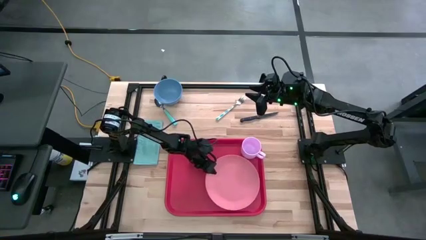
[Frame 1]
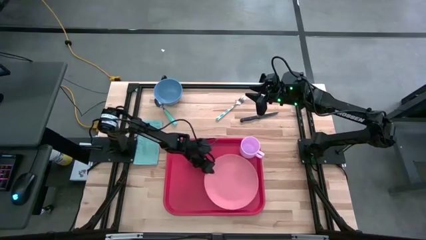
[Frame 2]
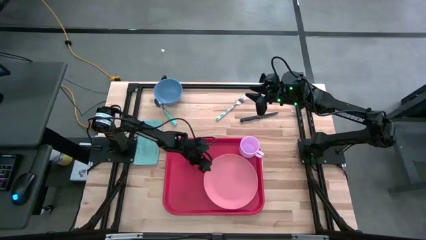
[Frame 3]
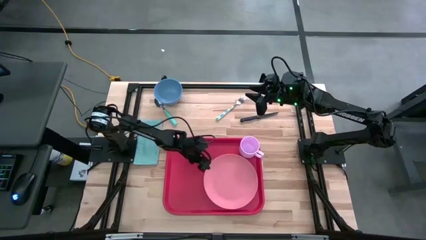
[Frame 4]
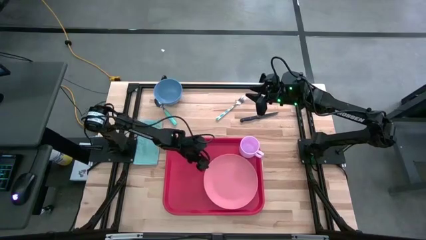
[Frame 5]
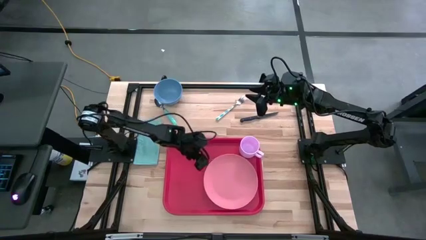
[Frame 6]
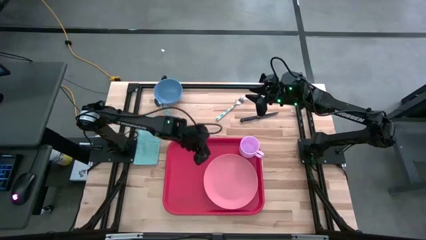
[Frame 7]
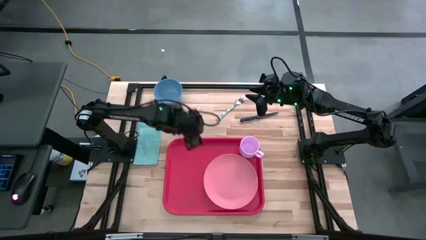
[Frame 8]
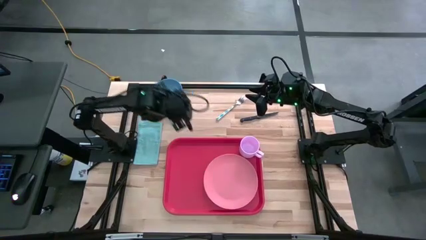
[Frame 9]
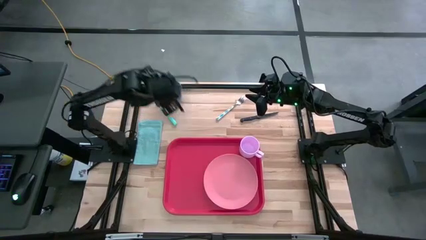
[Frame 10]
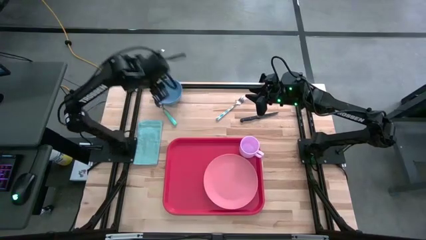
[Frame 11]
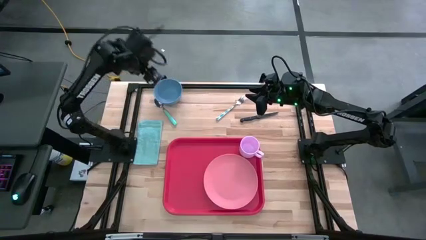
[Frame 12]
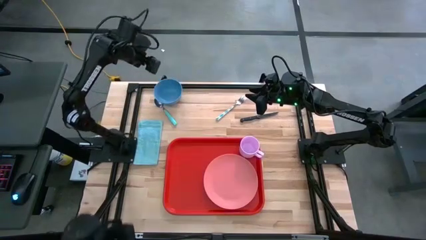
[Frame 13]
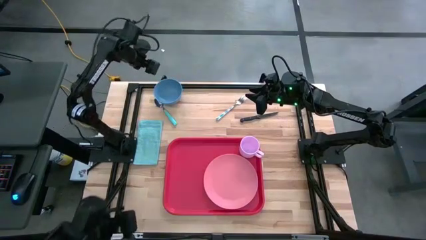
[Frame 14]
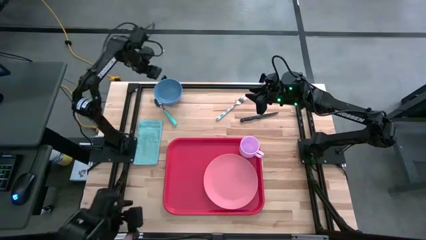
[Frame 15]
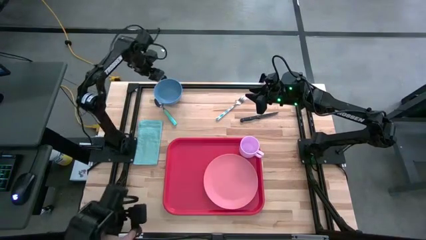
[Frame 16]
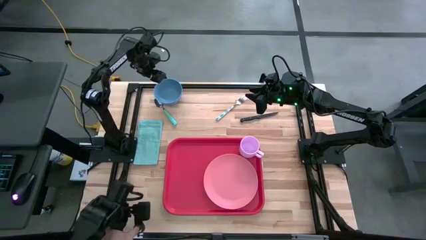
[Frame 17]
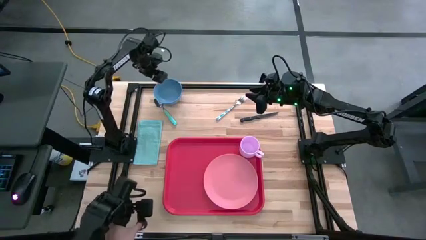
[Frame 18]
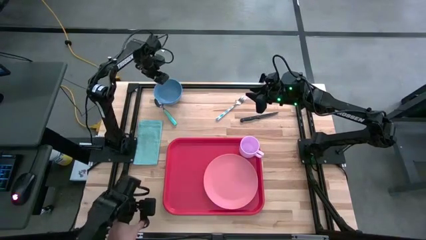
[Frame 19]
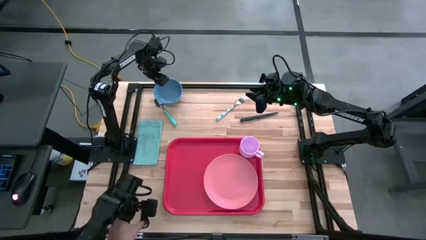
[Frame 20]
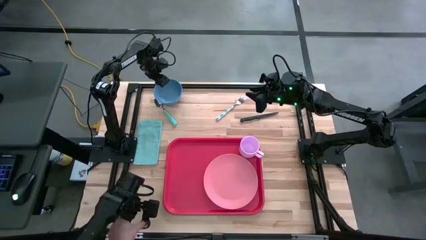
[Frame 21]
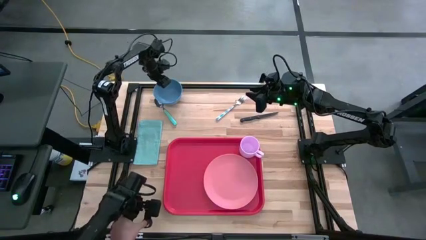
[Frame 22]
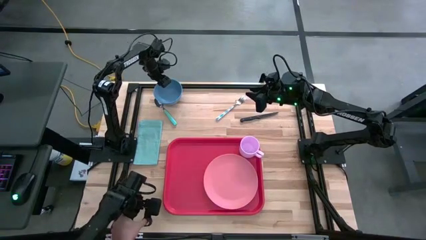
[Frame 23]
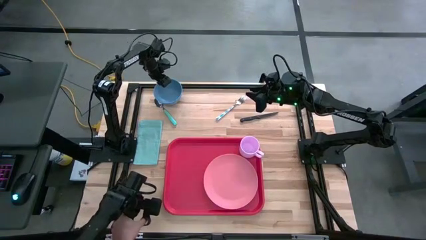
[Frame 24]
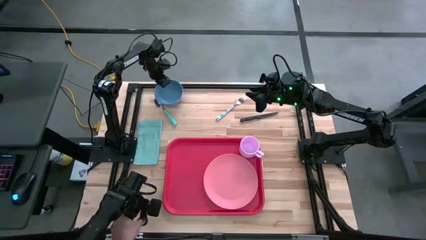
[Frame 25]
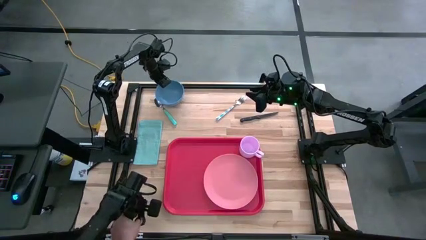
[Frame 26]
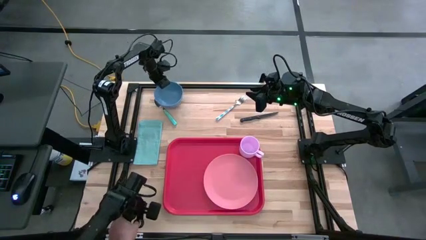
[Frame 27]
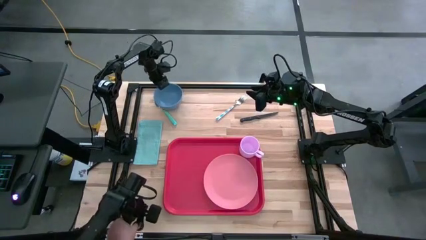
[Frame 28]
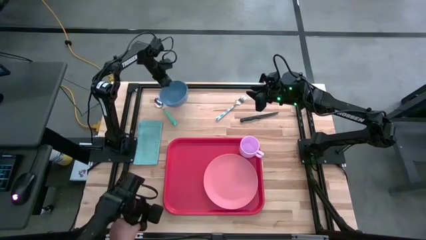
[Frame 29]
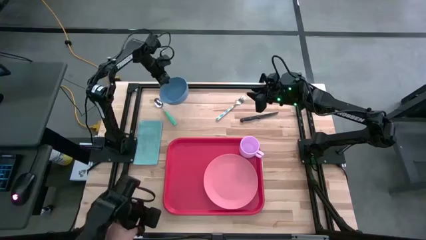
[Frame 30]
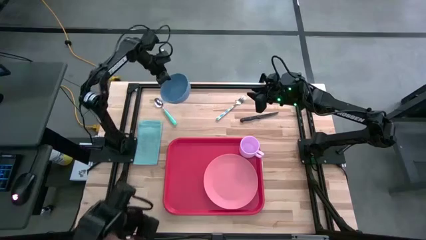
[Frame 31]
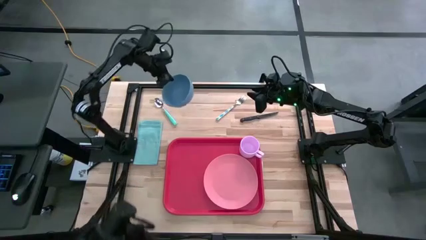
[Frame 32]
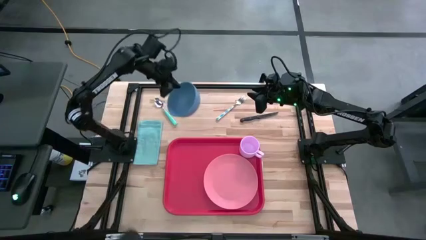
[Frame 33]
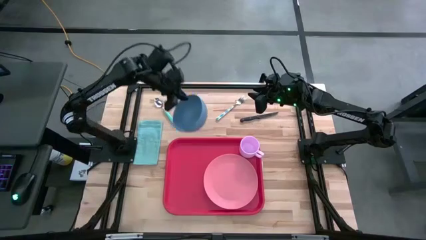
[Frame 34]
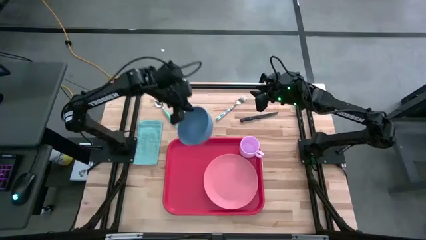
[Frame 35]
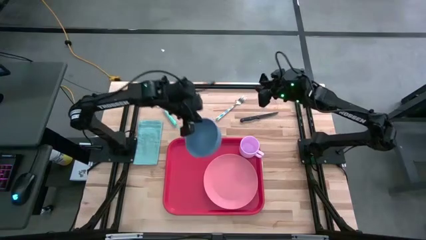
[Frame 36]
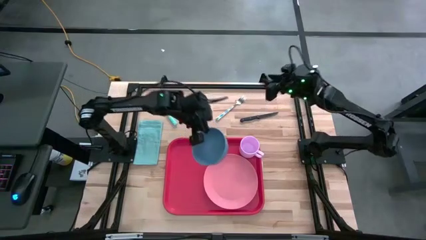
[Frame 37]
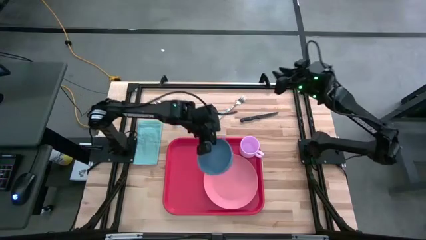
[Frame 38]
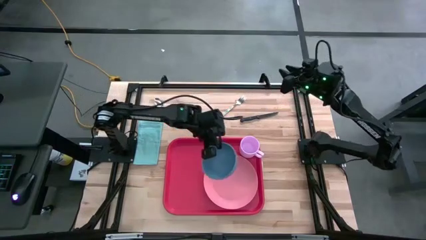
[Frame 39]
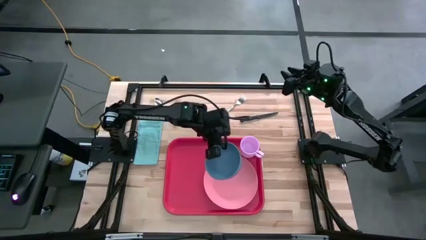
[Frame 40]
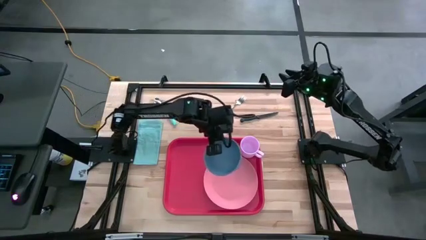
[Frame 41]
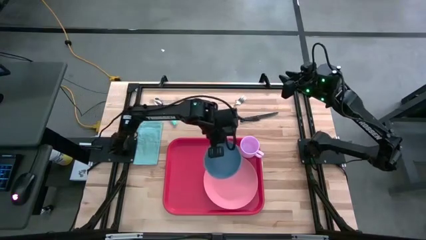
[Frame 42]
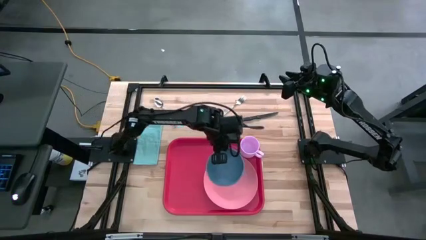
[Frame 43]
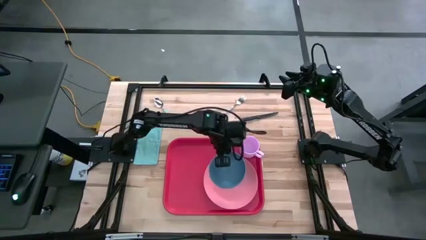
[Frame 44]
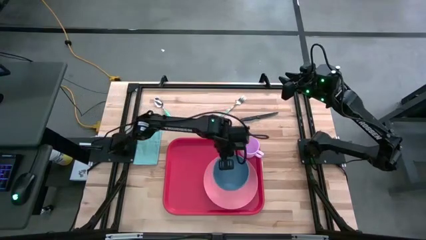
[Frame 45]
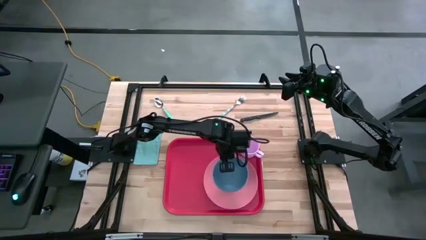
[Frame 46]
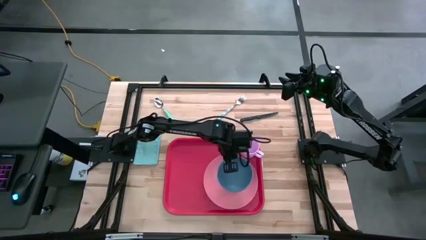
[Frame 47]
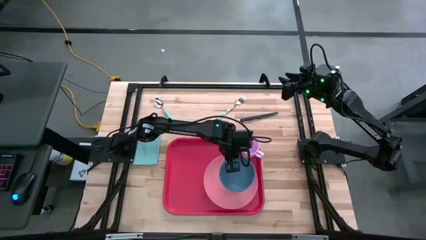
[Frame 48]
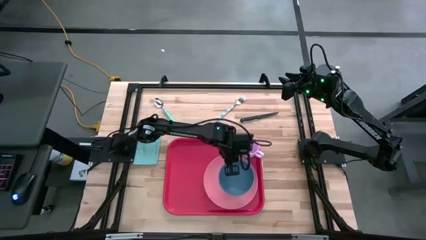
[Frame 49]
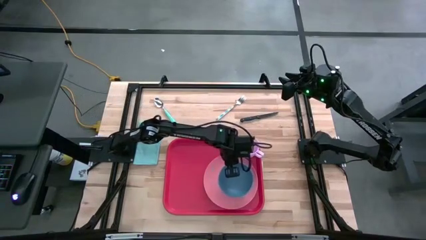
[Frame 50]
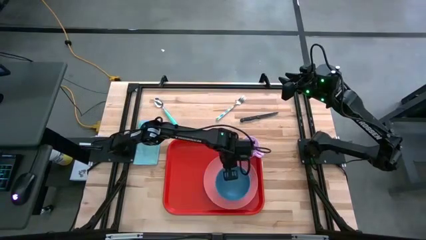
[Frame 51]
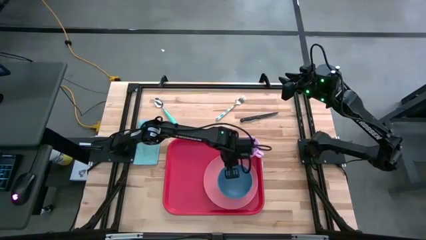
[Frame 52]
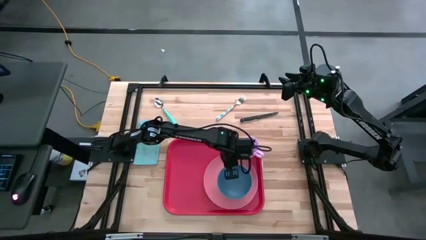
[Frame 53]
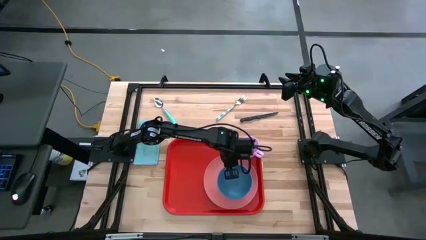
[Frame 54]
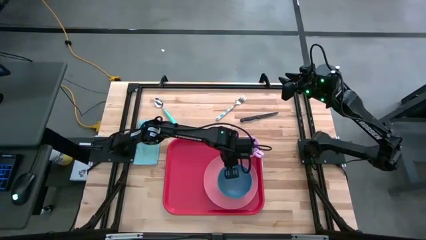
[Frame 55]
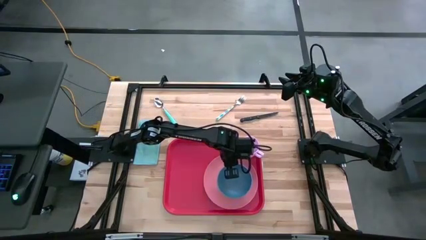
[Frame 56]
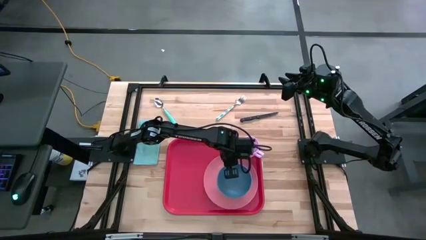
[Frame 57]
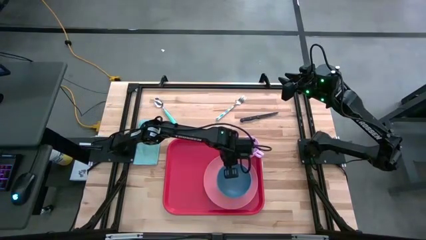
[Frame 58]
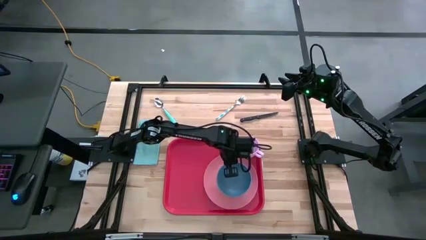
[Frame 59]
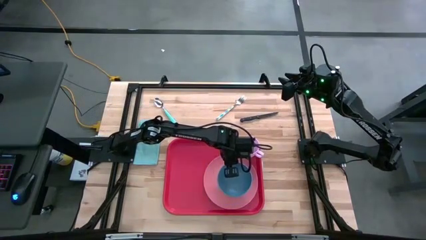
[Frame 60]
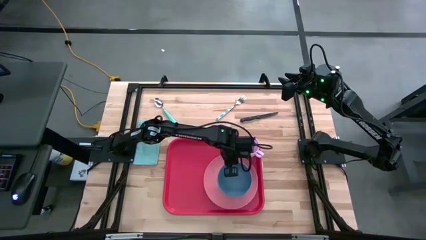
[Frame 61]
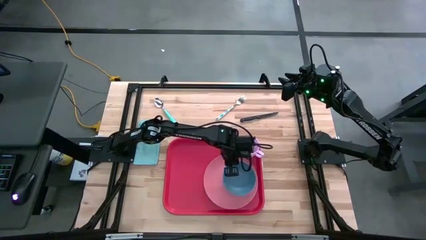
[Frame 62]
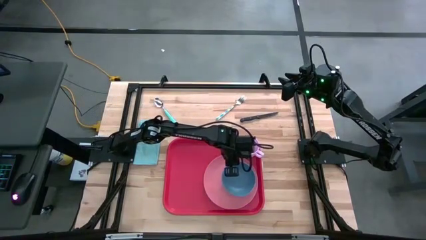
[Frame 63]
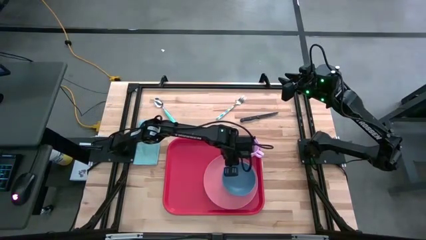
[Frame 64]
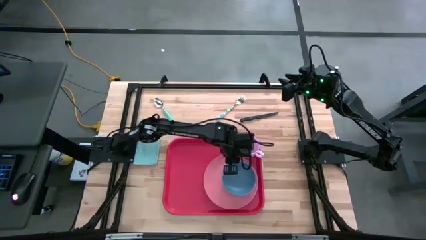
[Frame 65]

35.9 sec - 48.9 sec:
Task: Set up tray
Put the blue bowl on the pink plate
